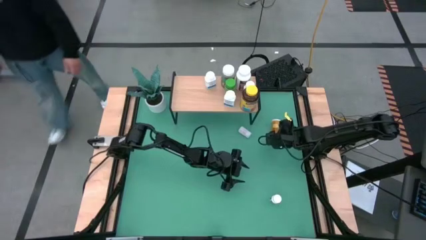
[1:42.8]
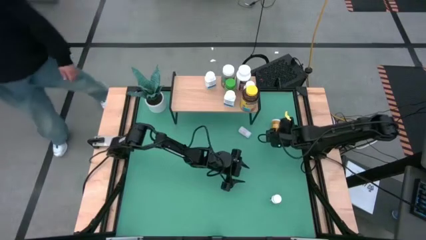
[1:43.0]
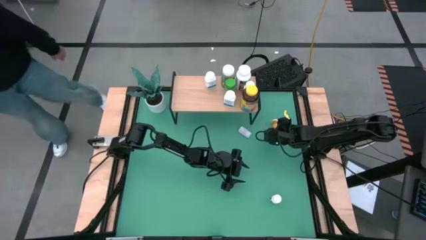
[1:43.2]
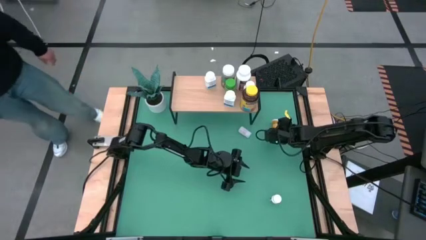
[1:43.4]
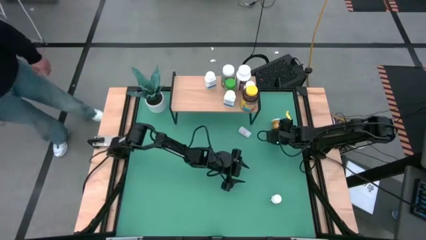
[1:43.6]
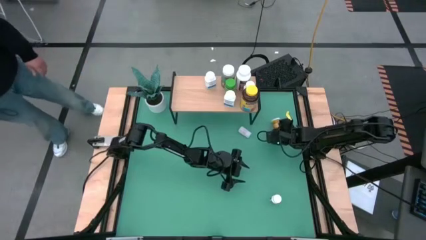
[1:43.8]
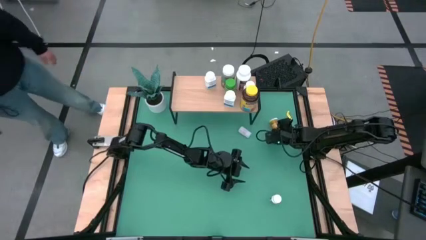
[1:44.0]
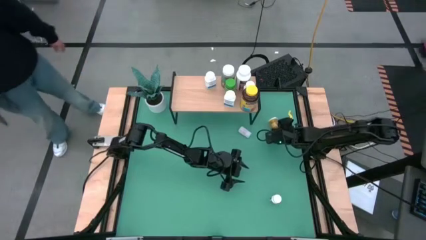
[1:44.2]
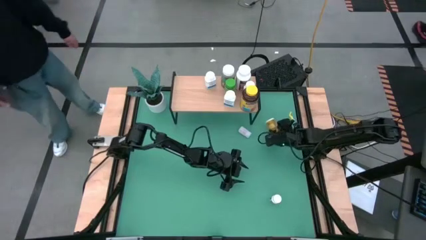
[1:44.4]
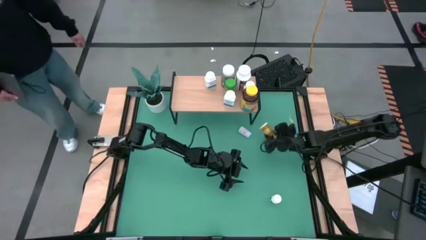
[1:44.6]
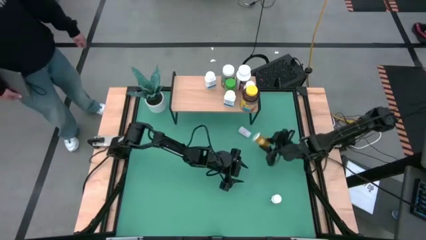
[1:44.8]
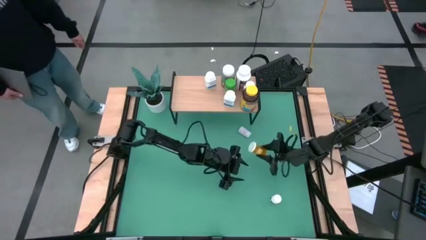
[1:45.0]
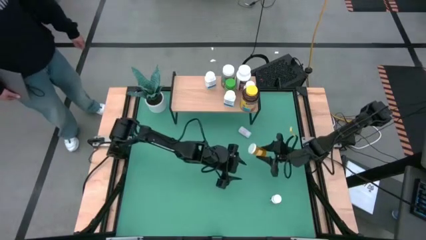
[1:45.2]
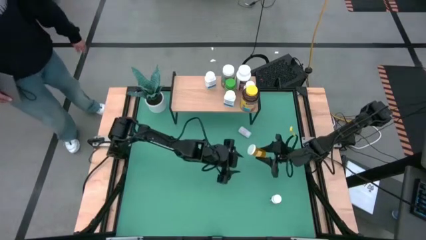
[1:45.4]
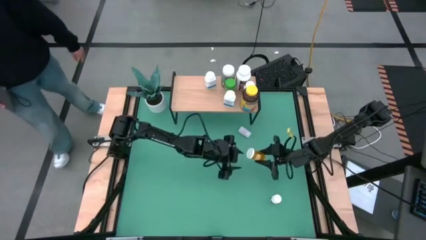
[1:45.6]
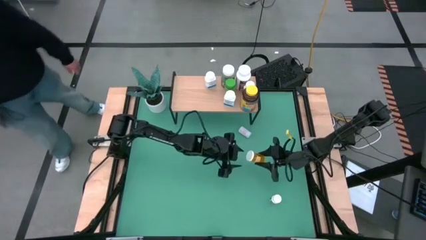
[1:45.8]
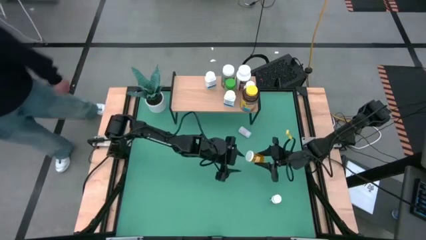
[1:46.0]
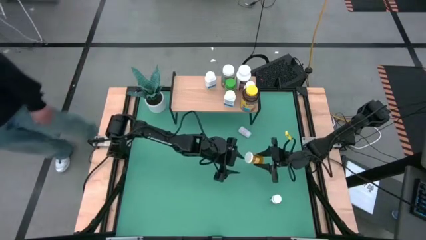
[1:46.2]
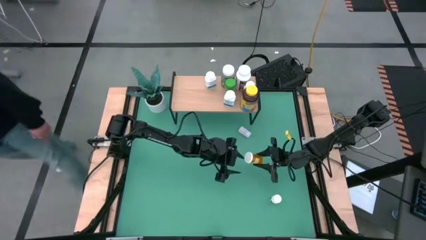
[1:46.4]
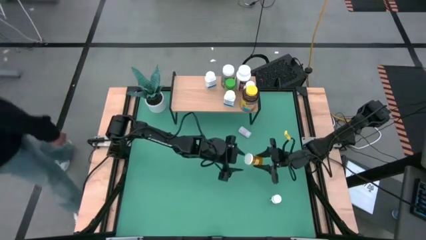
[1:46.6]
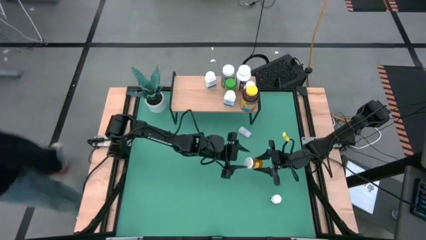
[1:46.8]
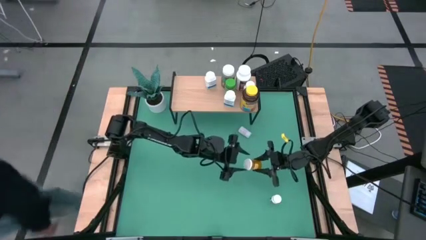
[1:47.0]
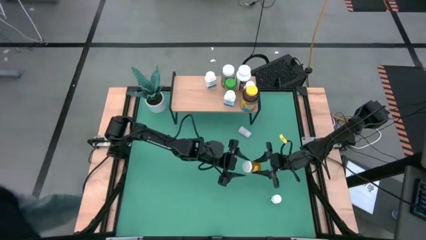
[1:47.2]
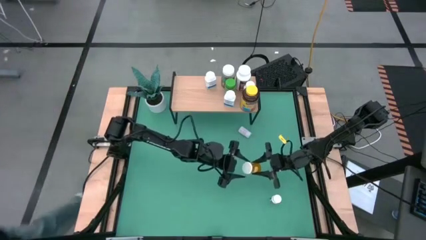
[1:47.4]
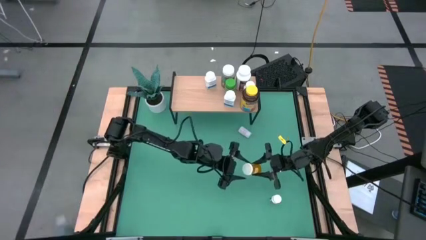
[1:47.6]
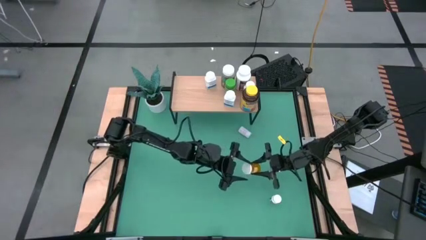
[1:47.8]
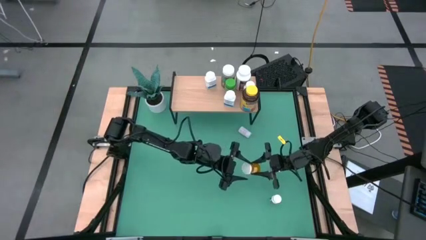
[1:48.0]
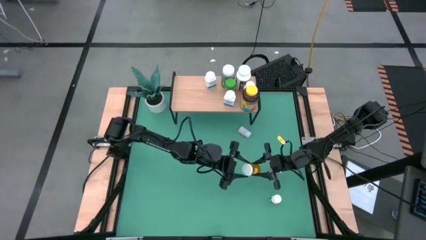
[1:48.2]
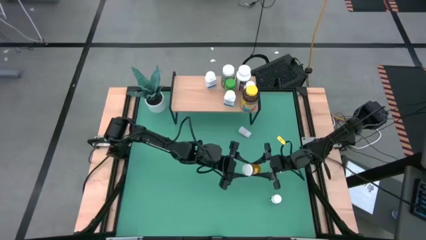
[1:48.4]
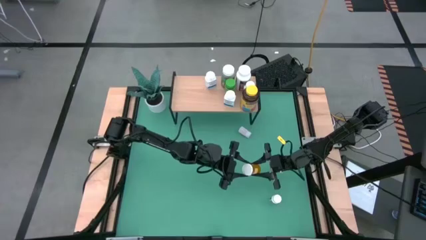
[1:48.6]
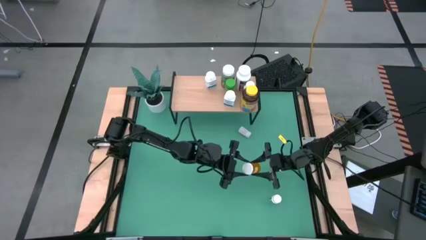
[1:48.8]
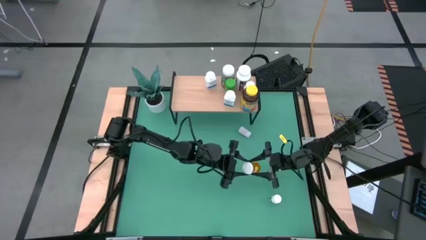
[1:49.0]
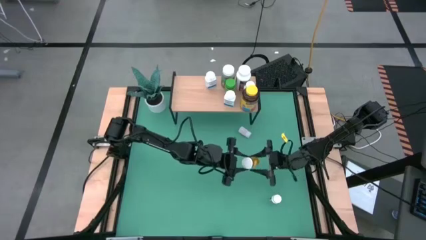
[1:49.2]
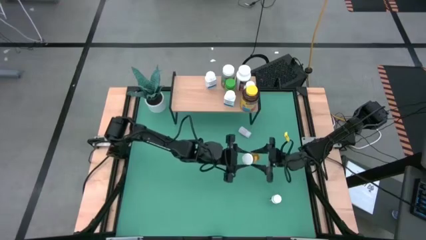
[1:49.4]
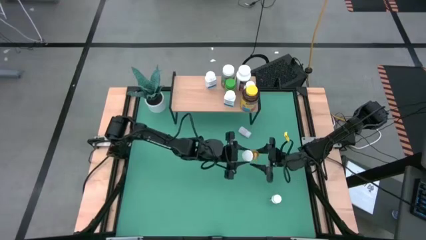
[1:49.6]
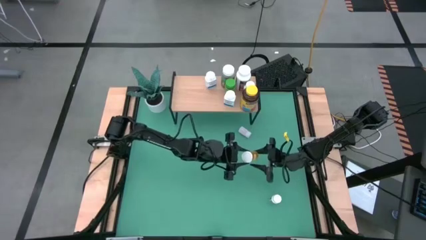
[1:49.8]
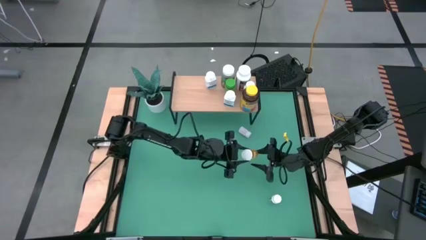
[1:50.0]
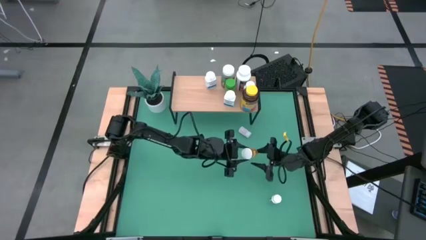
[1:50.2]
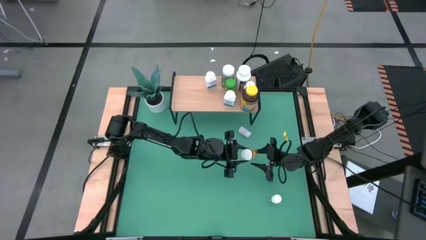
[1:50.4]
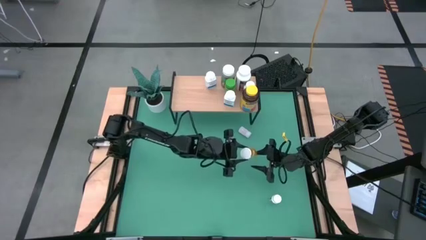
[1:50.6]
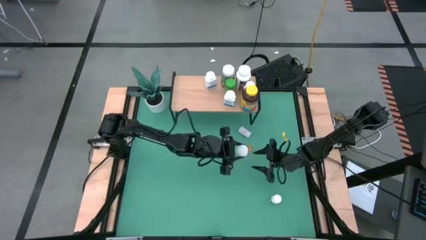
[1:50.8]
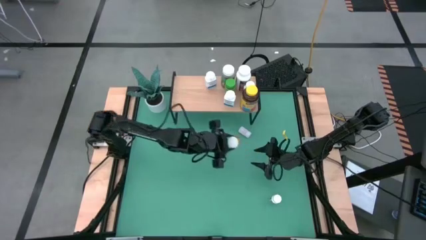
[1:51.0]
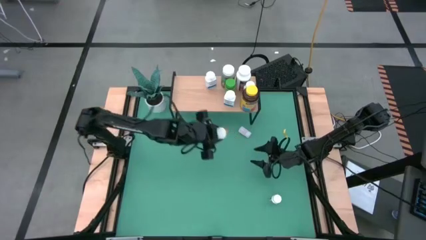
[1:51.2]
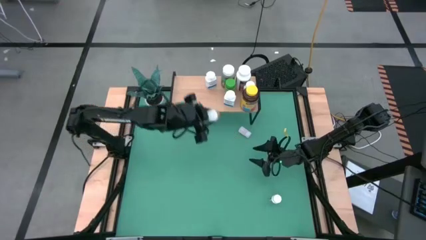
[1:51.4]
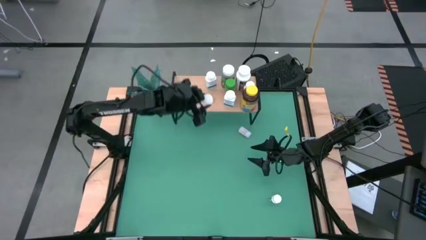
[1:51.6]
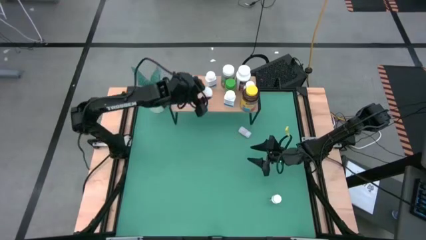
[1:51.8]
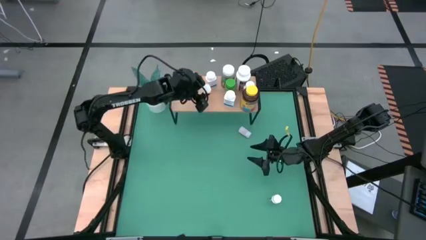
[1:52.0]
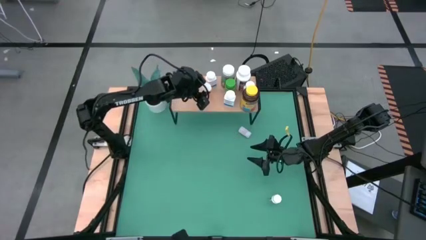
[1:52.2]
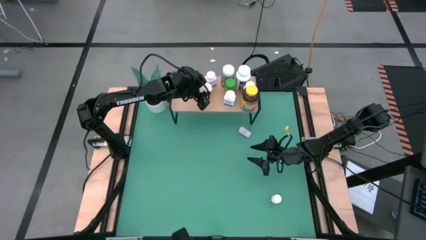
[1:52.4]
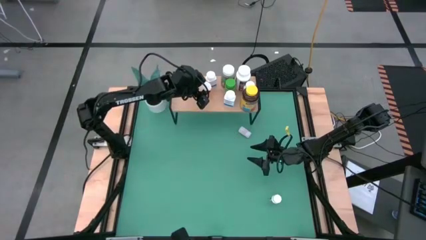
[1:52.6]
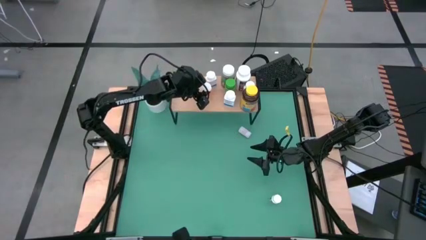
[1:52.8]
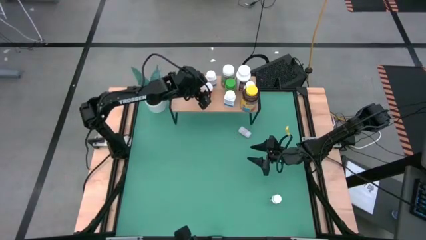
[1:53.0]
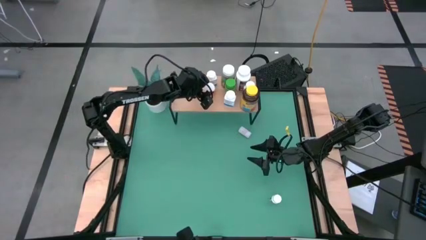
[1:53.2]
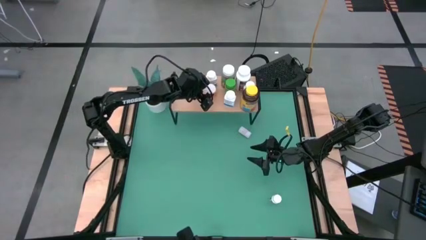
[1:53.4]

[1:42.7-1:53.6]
Task: Pick and place medicine bottles onto shelf by color
Put the orange pill bottle on the shelf

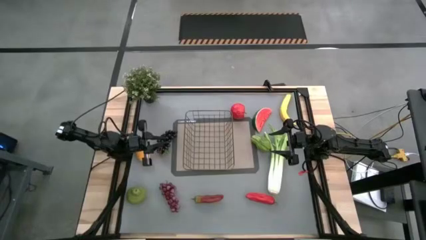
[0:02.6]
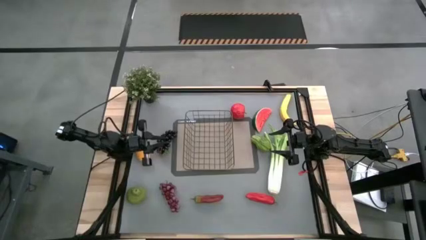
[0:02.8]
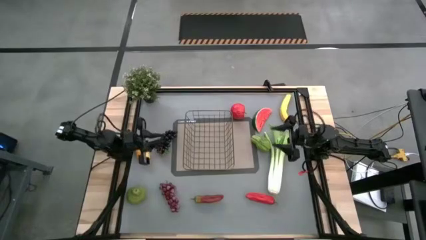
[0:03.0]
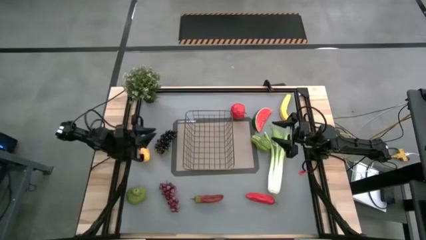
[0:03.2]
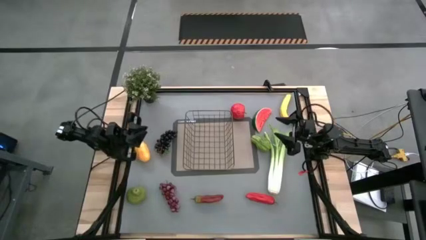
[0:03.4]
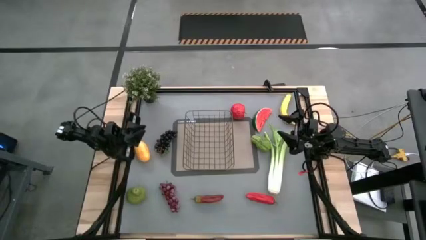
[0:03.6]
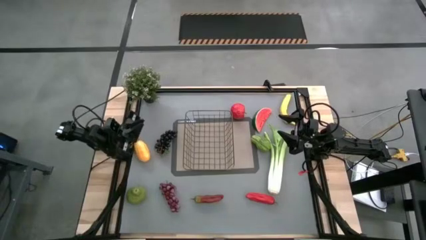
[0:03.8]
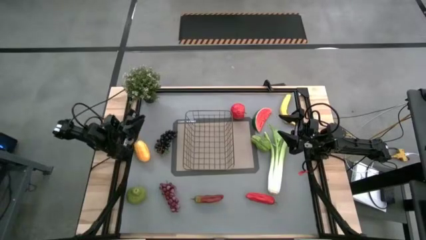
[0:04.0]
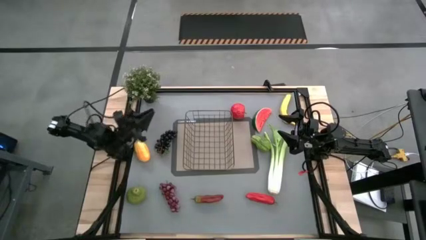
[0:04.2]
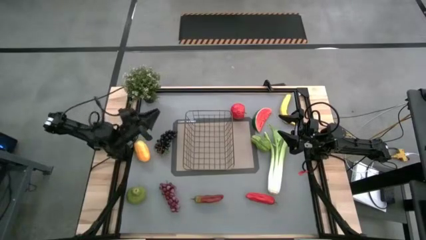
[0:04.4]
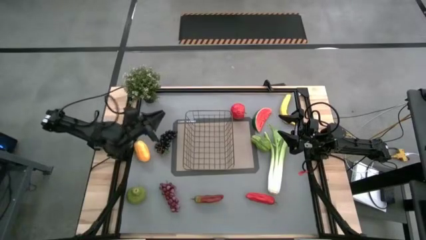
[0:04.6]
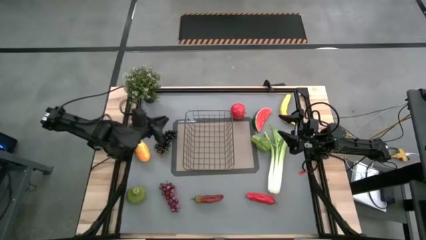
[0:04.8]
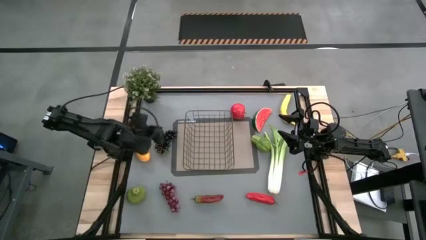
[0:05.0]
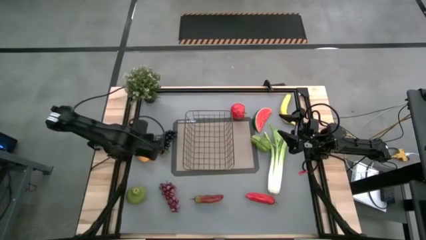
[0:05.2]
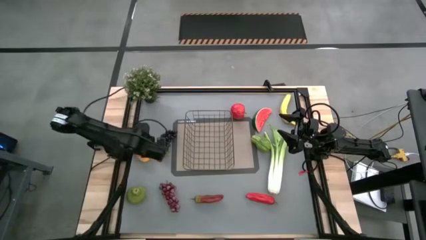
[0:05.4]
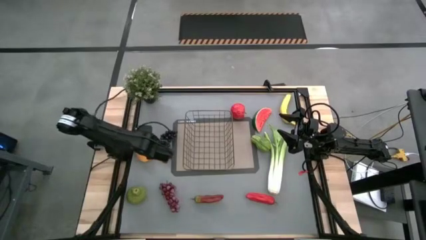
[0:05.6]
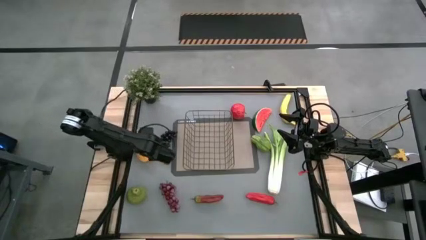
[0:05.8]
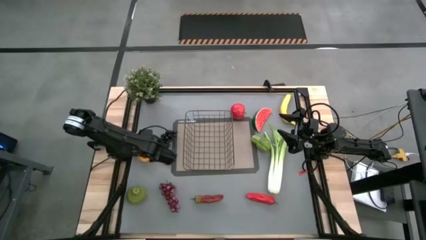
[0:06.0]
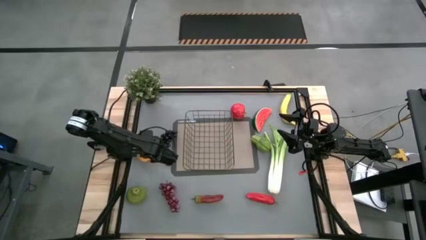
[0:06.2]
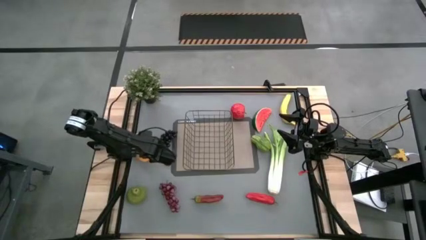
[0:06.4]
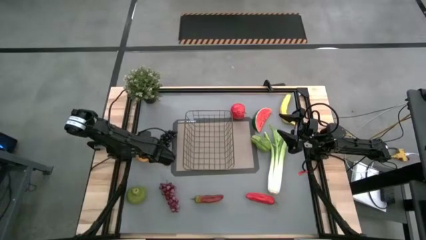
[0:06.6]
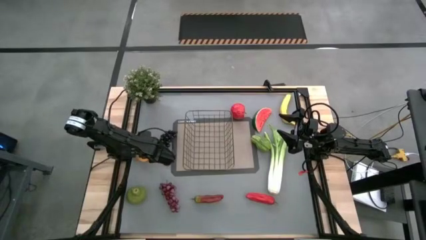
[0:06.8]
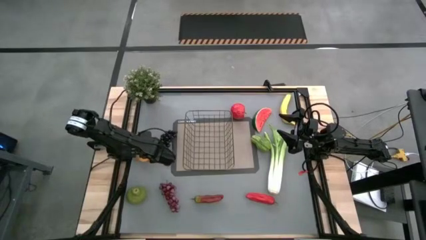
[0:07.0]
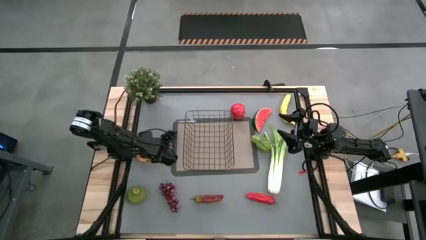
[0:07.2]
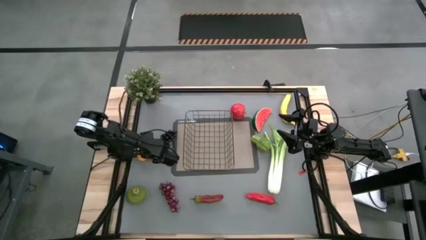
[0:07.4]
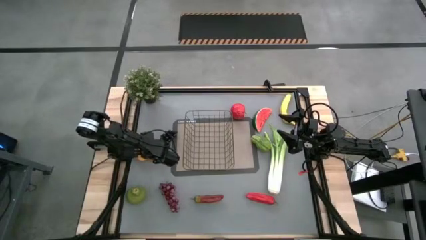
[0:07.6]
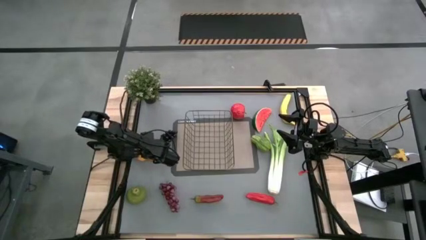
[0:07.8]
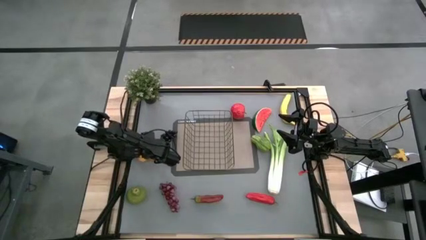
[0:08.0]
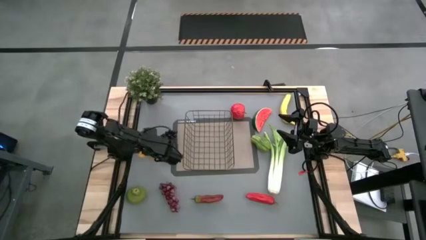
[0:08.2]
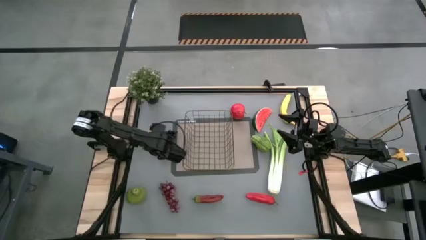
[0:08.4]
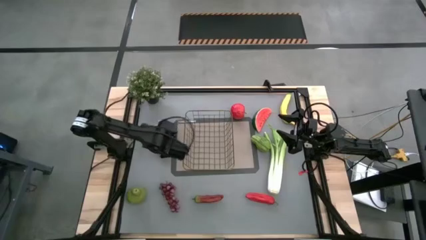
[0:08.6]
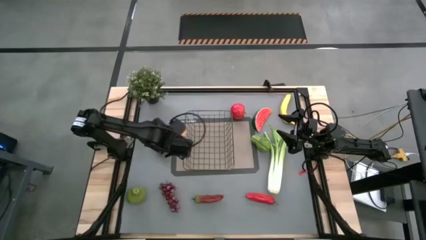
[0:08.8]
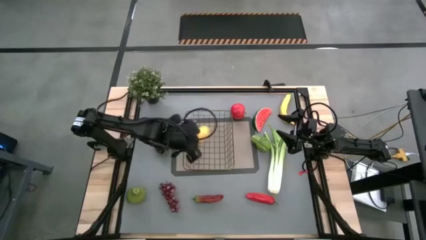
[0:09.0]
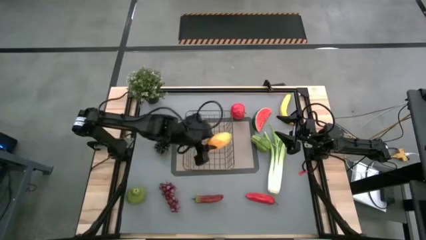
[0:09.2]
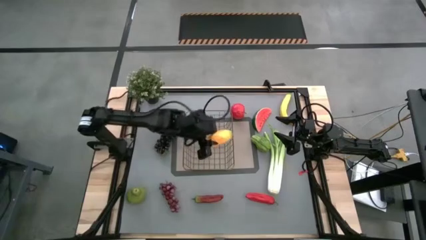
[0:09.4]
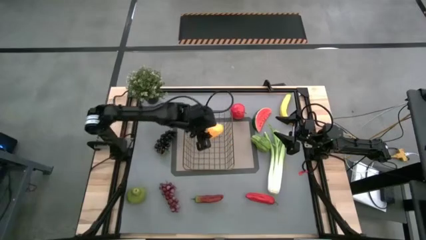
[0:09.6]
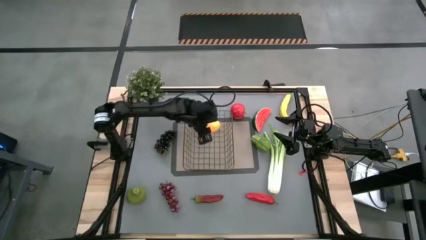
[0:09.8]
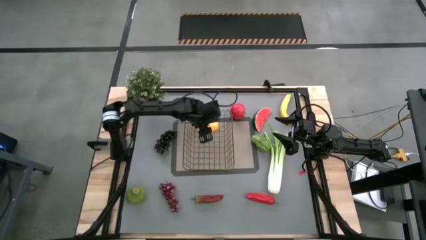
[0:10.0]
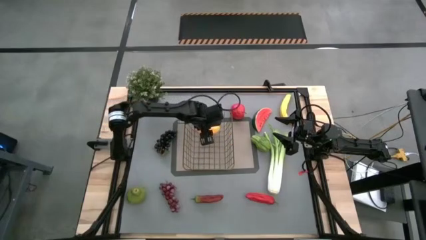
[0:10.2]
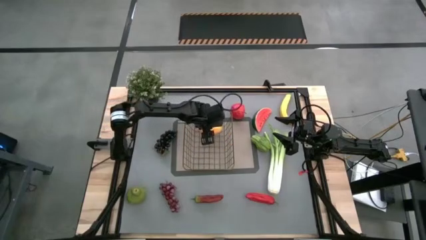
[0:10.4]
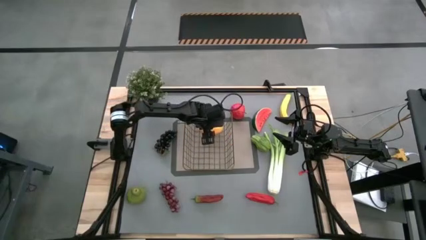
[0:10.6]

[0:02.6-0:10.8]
Task: Build produce basket
Put the yellow mango into the wire basket
